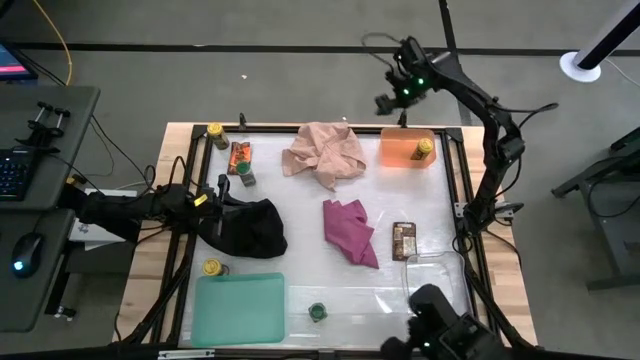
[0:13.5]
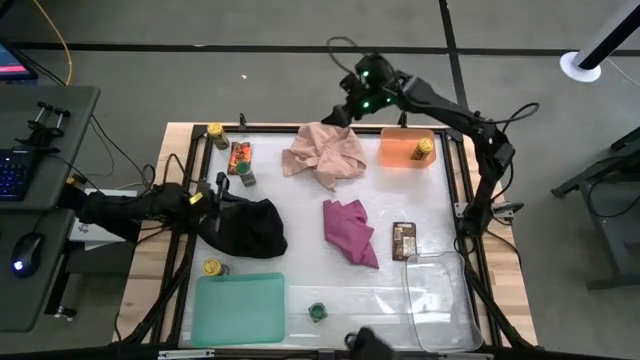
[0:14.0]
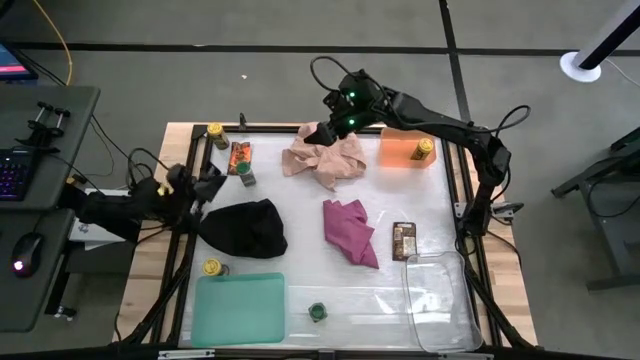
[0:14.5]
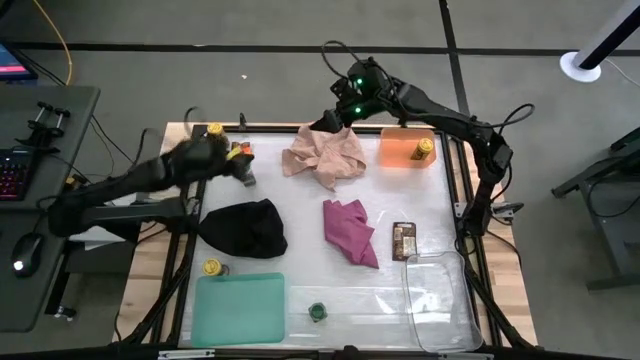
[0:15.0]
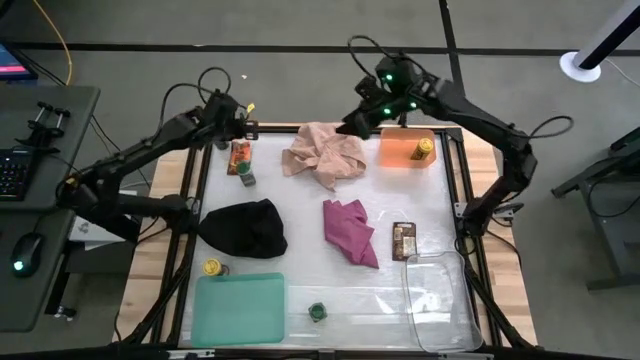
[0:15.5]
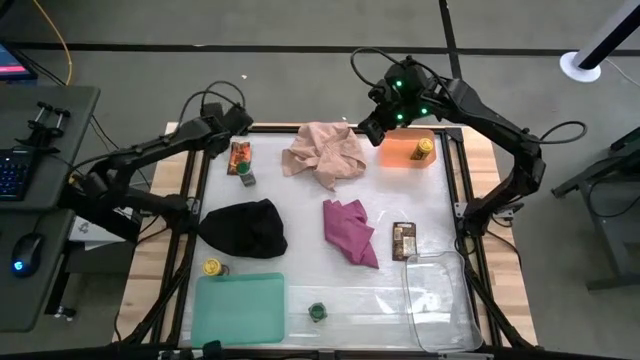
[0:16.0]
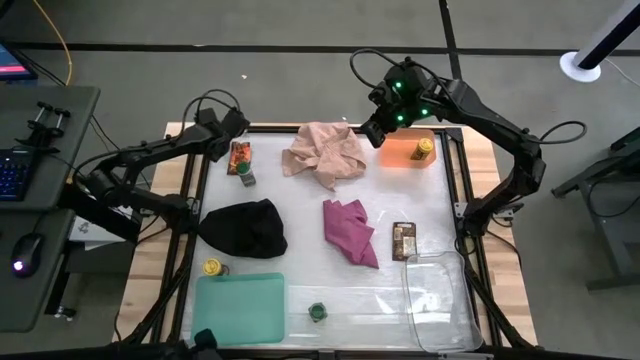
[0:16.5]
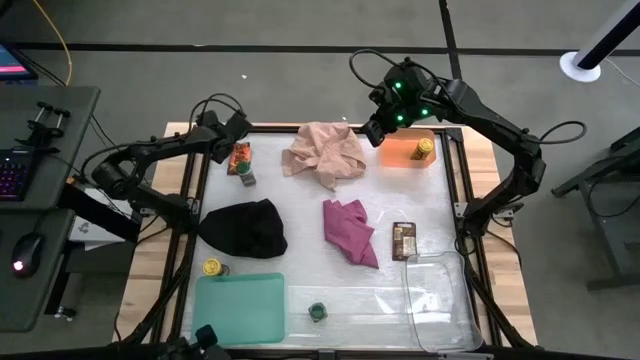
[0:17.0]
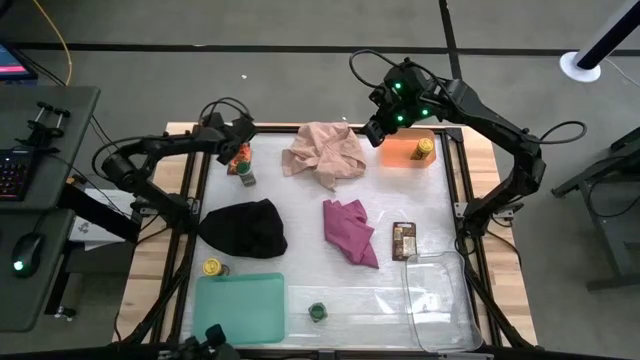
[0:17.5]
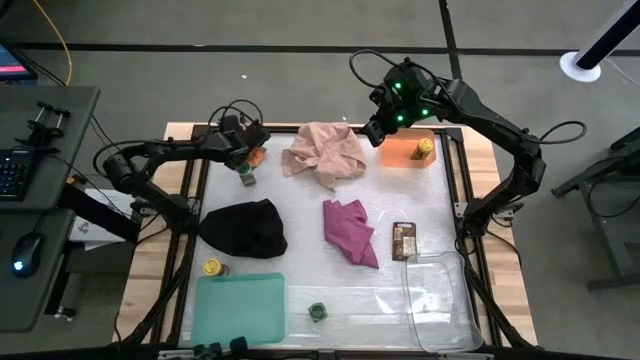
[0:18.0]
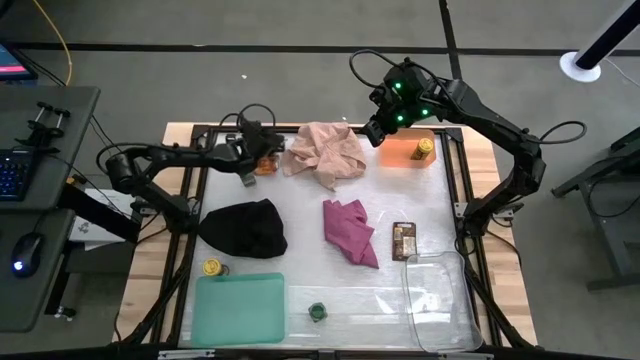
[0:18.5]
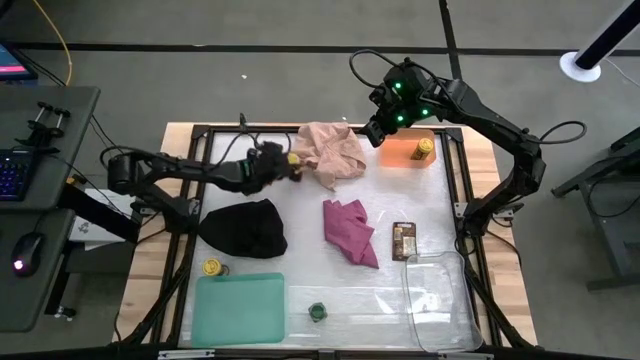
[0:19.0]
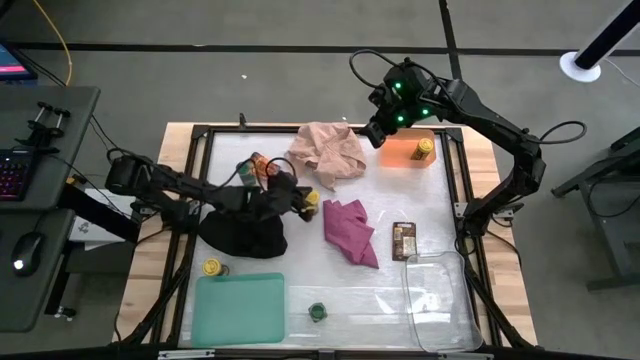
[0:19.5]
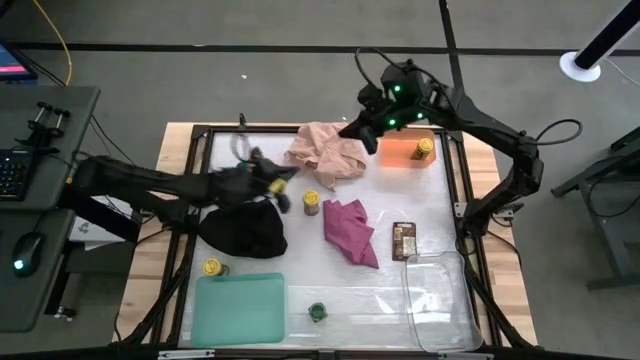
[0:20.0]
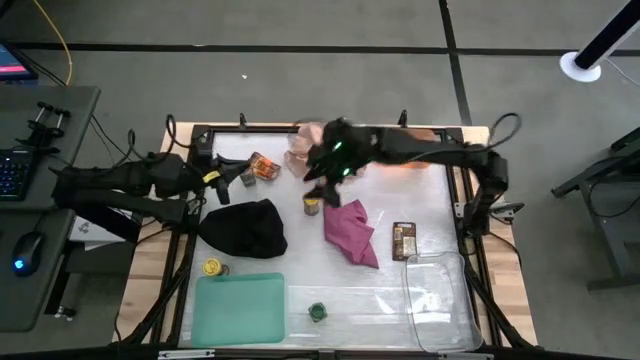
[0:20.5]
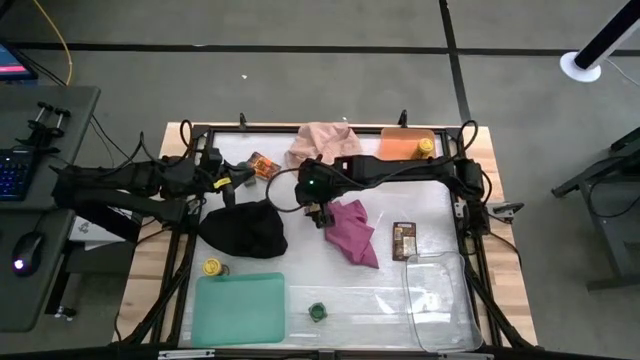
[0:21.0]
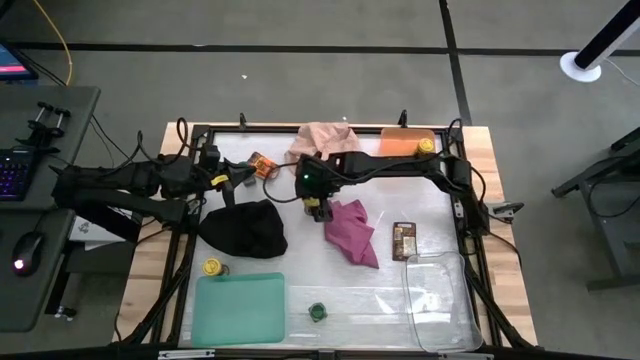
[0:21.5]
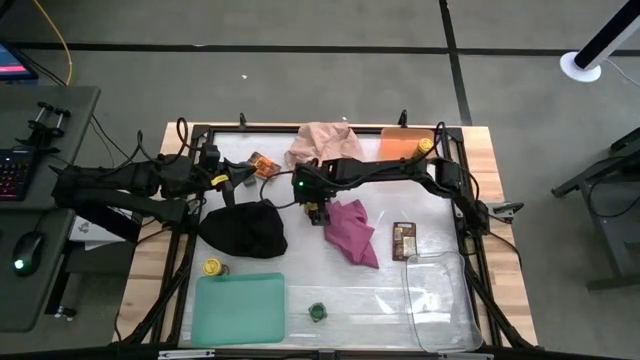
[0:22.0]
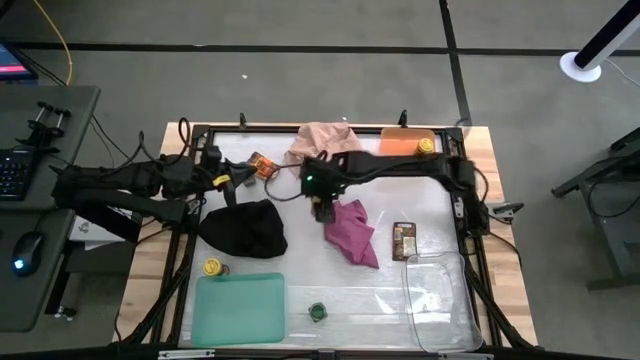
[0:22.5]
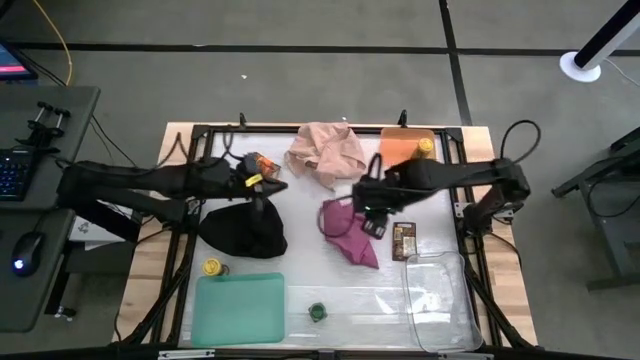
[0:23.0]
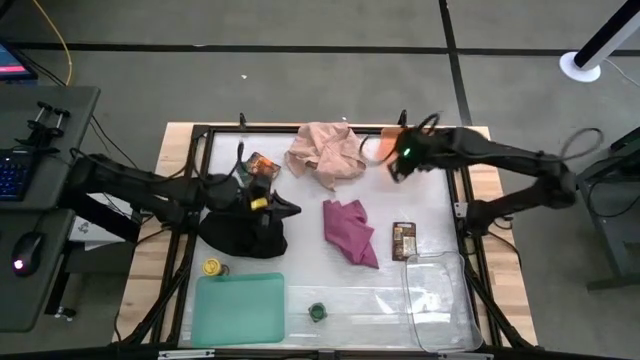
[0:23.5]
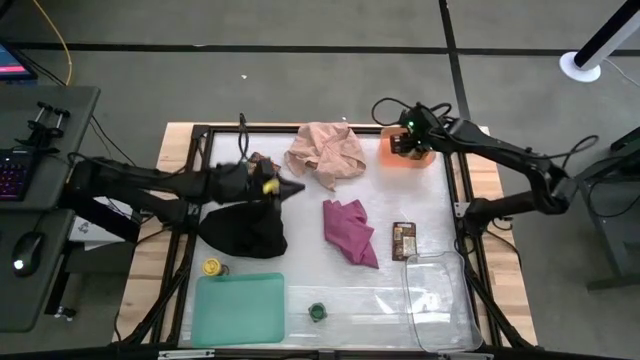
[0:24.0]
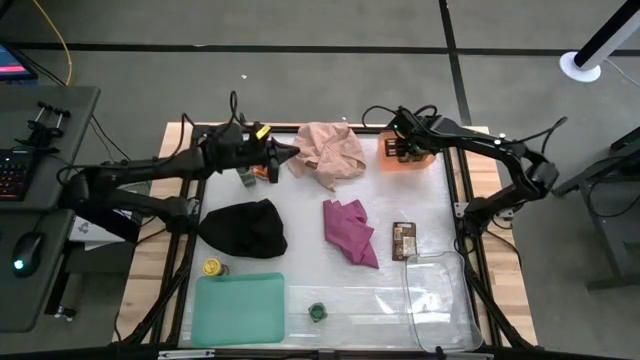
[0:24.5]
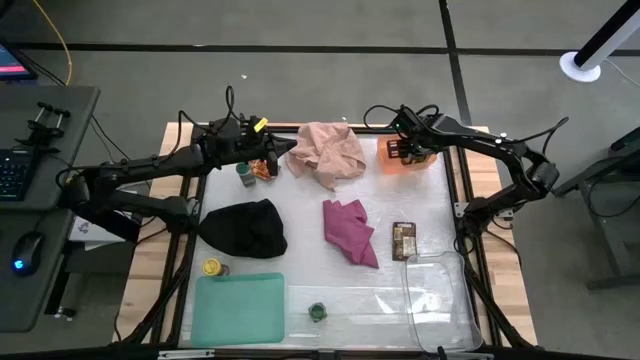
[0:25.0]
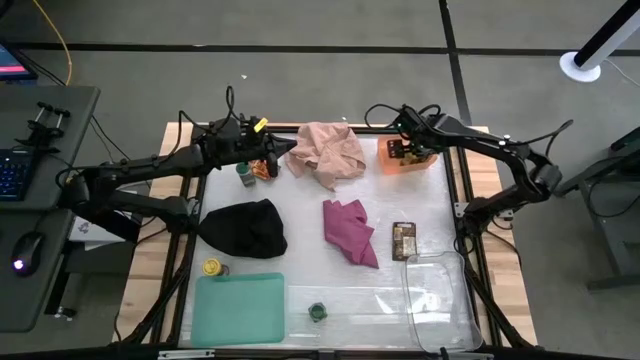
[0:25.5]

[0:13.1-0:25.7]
Task: Sort spices by type
Put the top yellow seasoning bottle into the orange bin

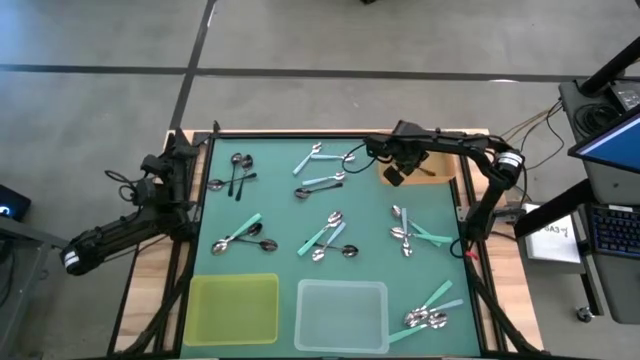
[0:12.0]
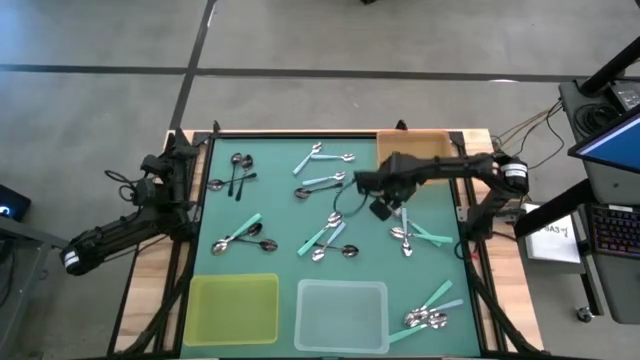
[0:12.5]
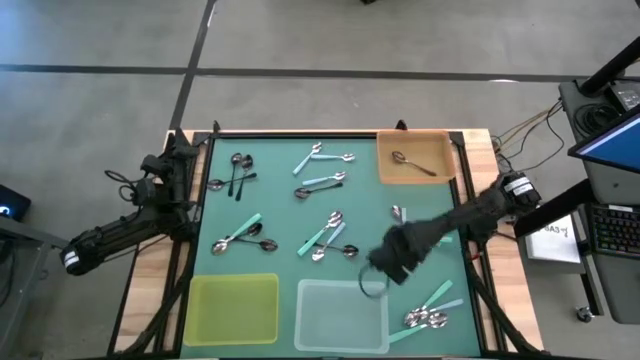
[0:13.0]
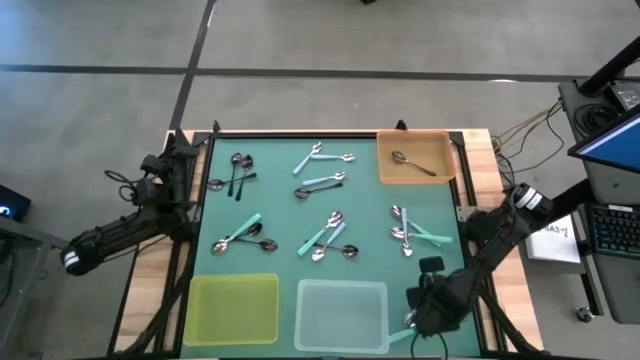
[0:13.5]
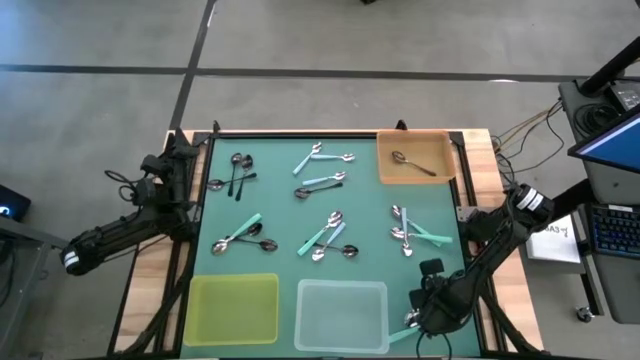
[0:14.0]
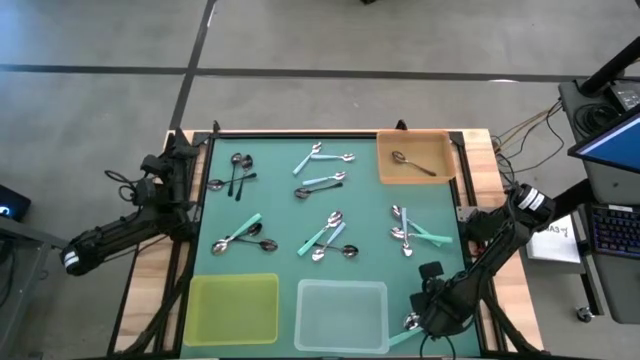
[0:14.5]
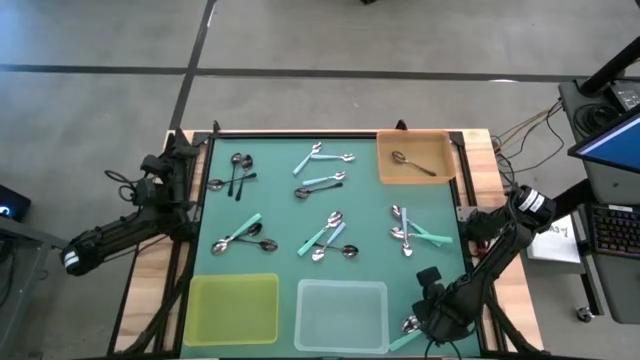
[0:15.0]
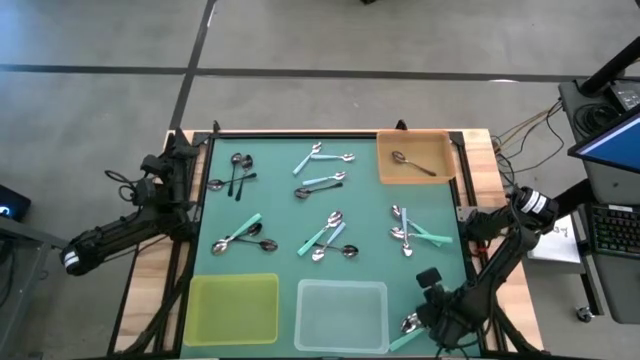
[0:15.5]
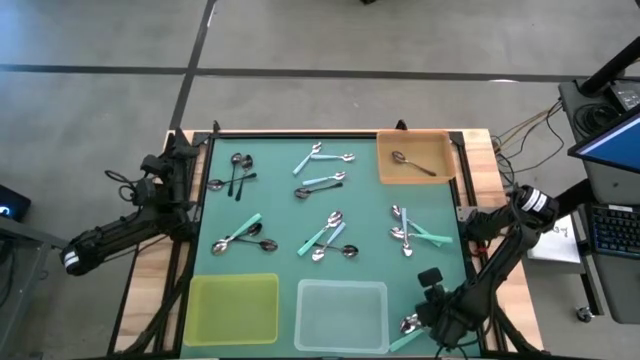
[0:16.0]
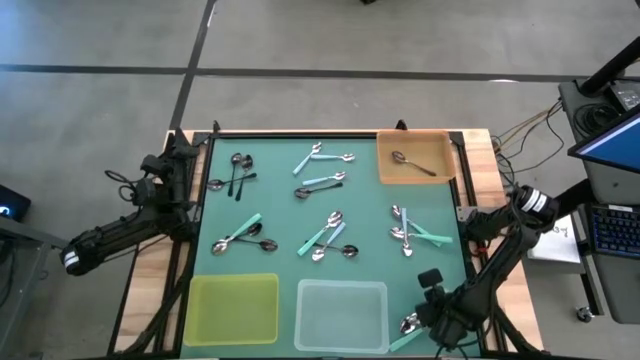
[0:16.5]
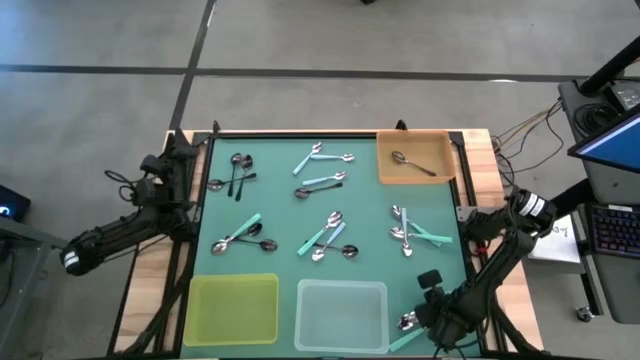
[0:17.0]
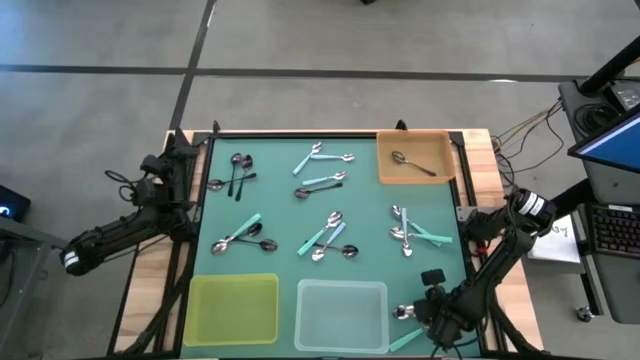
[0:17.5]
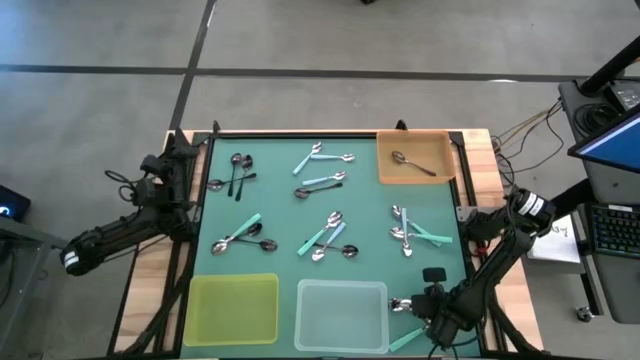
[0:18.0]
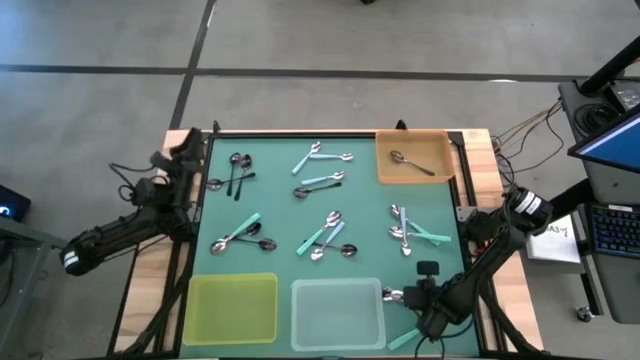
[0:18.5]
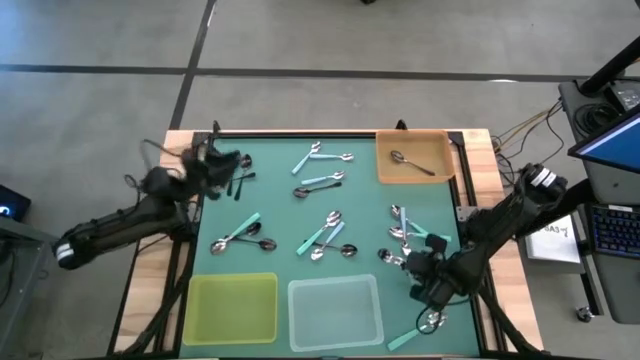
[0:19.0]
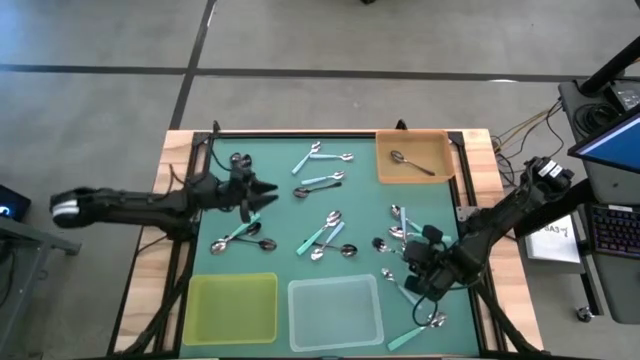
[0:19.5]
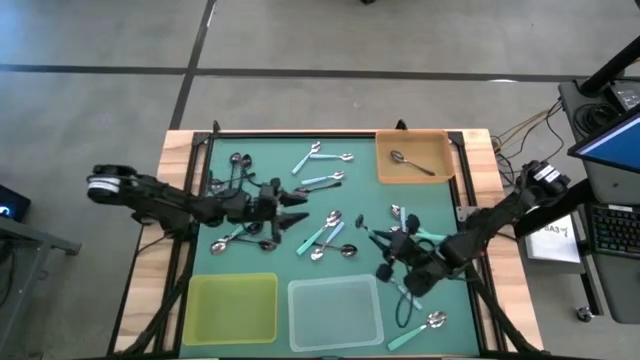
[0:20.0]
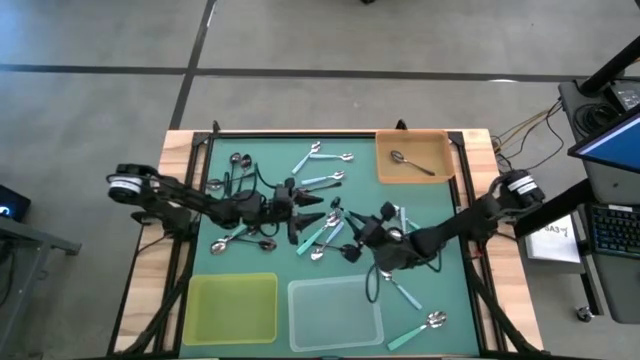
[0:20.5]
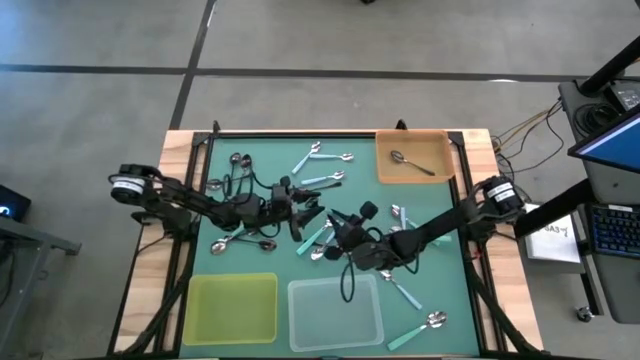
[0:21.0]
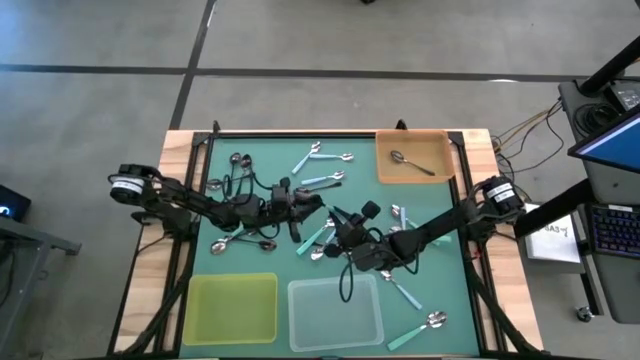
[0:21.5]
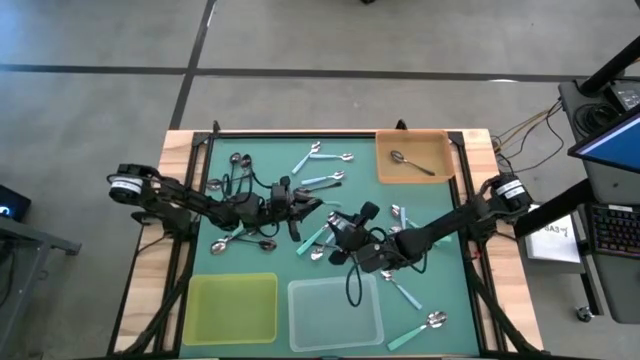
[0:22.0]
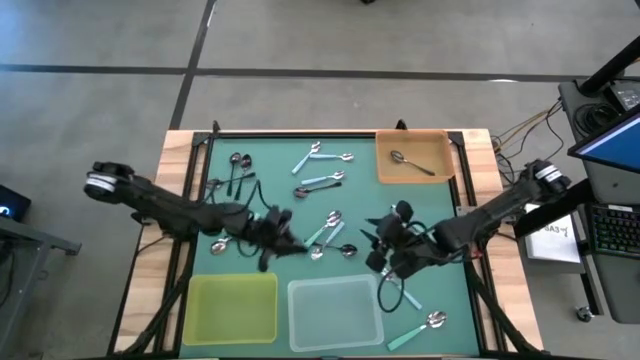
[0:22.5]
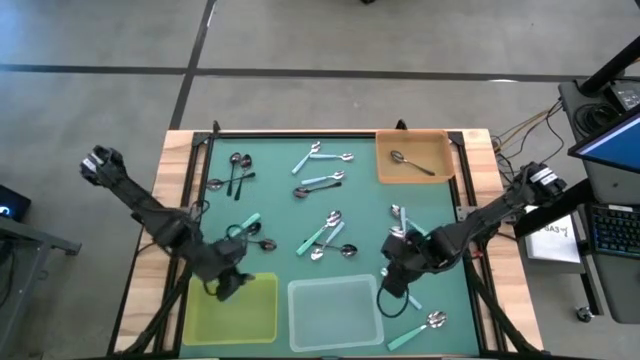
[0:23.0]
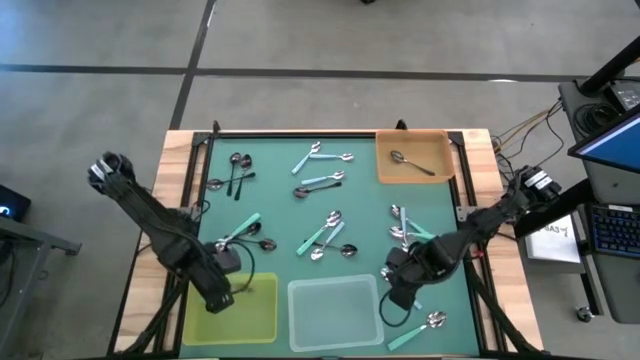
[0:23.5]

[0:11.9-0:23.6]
Task: Sort silverware by color (type)
Put the green spoon into the yellow bin
